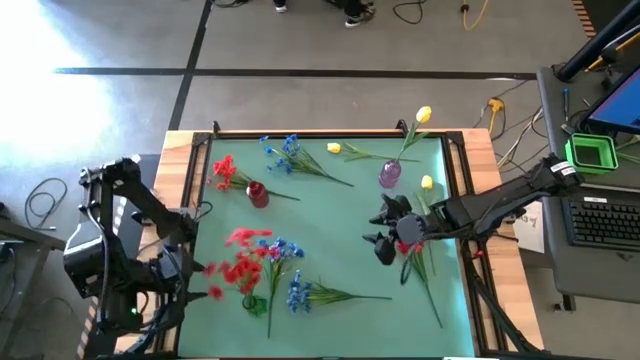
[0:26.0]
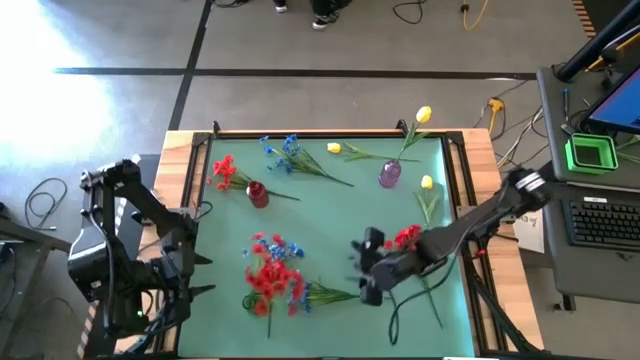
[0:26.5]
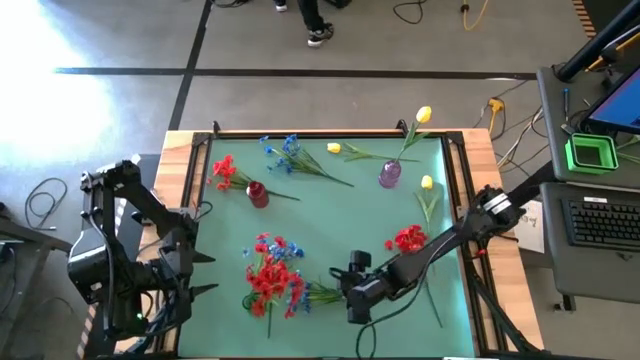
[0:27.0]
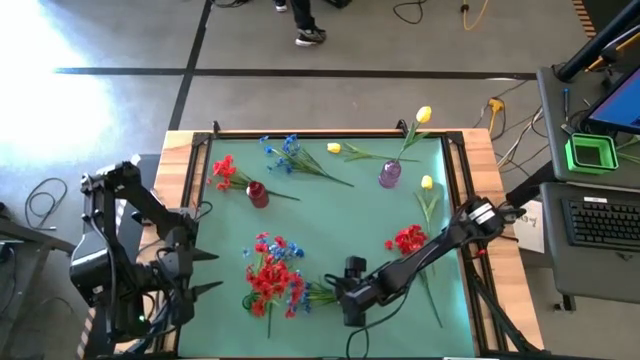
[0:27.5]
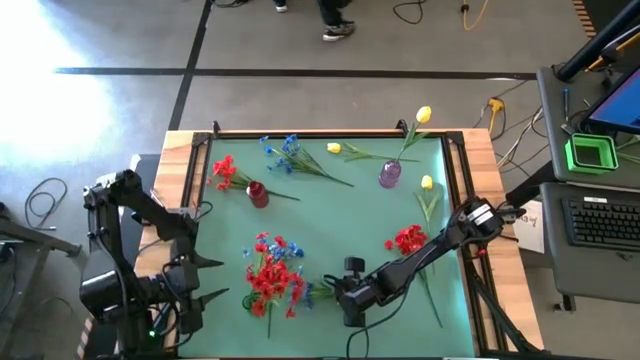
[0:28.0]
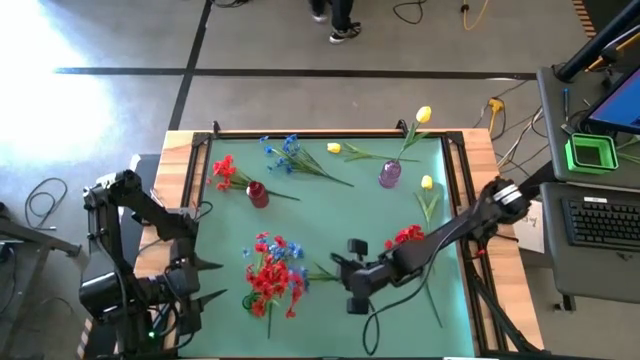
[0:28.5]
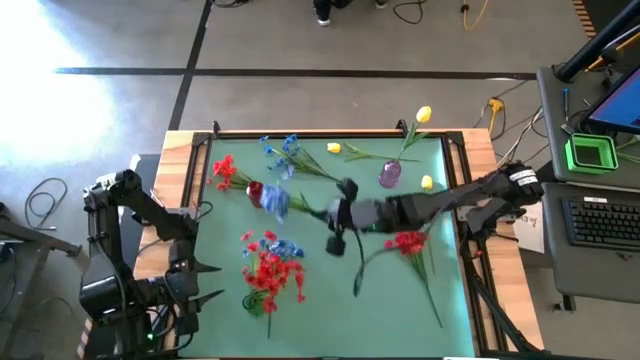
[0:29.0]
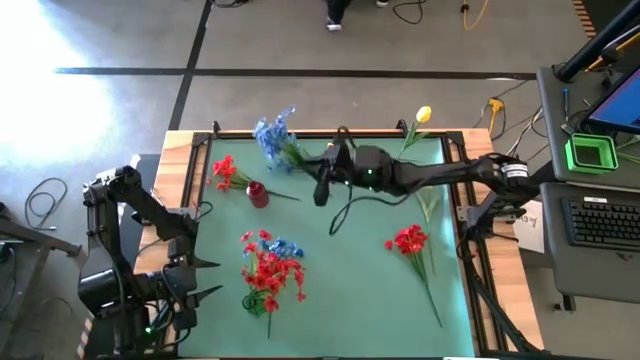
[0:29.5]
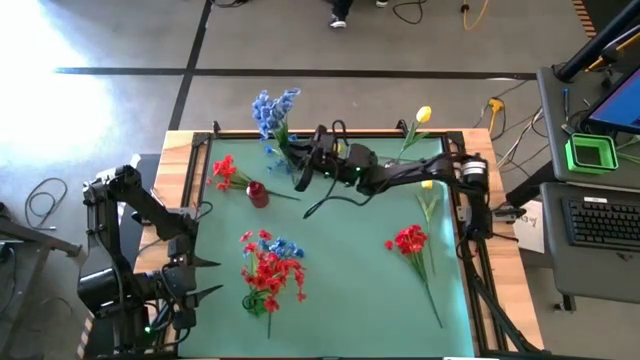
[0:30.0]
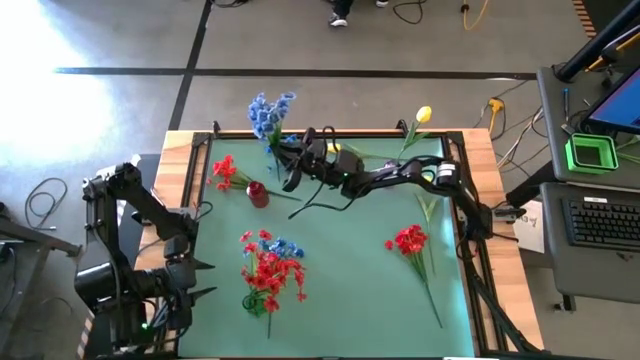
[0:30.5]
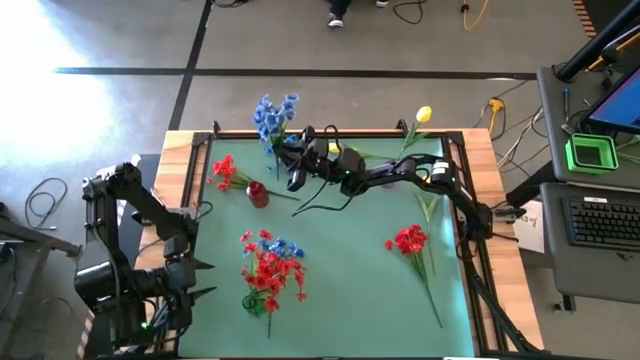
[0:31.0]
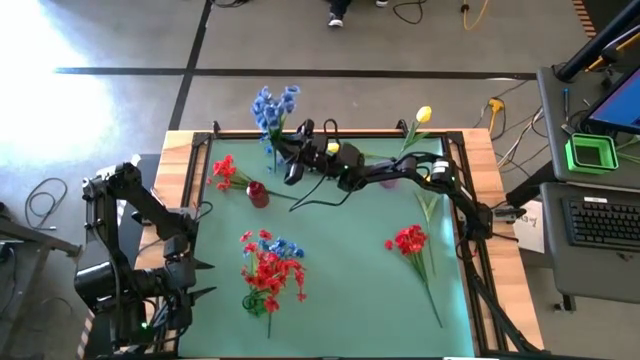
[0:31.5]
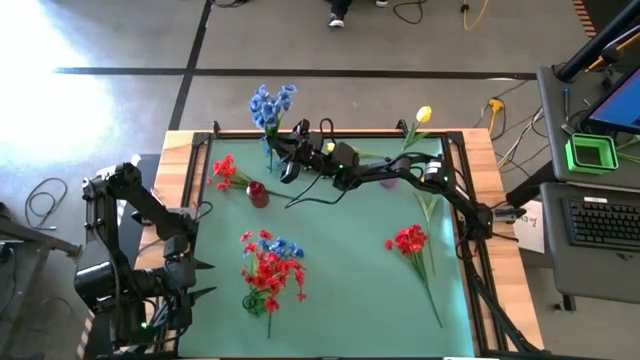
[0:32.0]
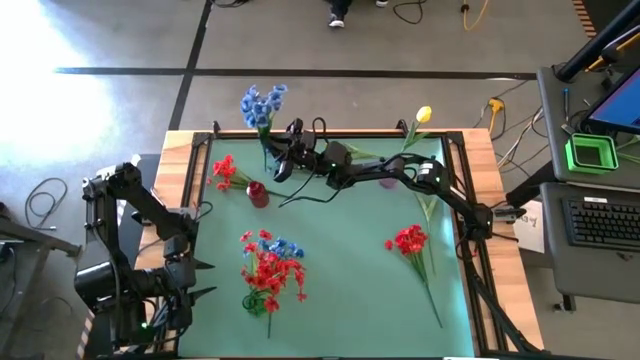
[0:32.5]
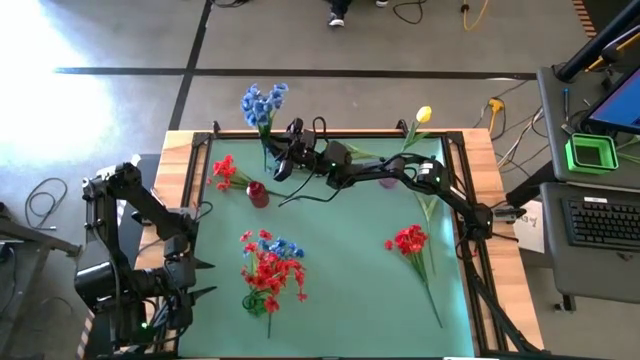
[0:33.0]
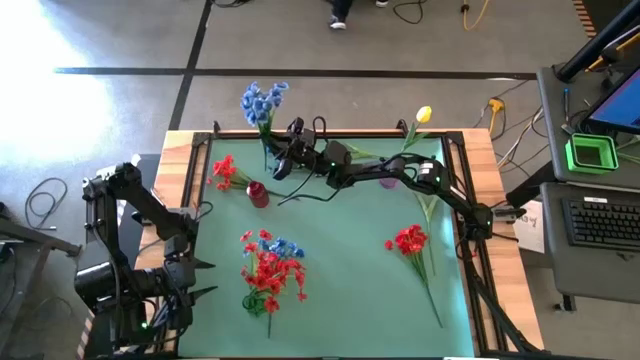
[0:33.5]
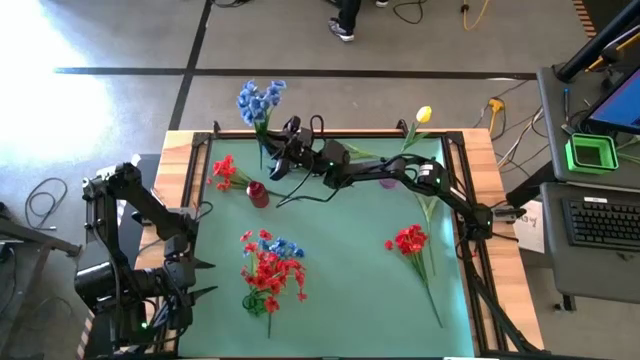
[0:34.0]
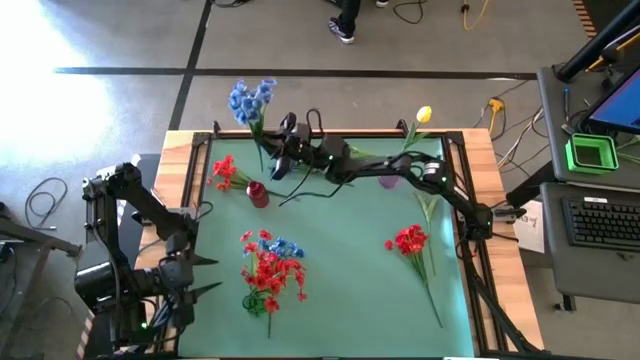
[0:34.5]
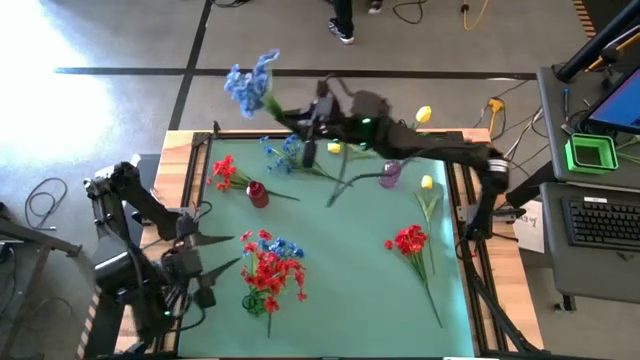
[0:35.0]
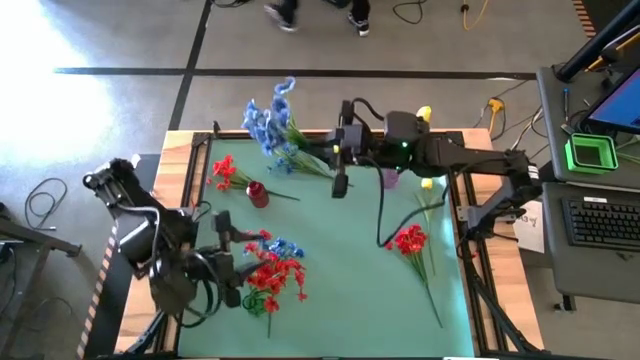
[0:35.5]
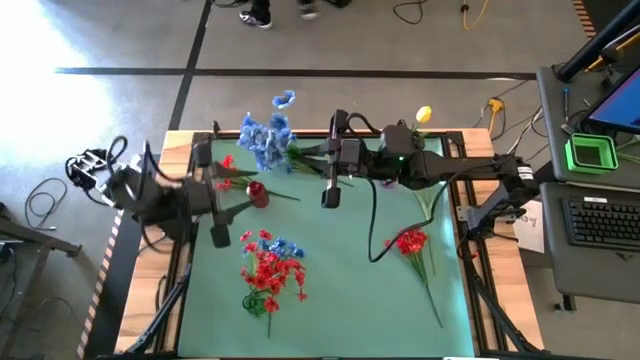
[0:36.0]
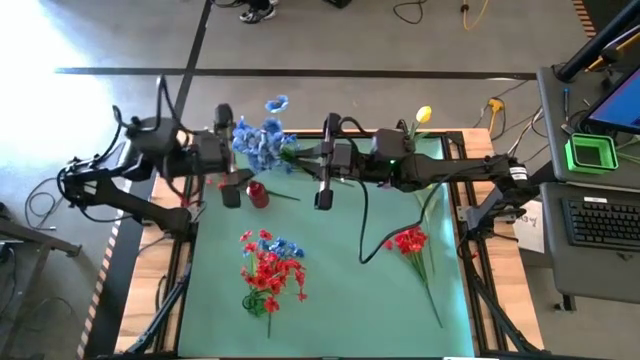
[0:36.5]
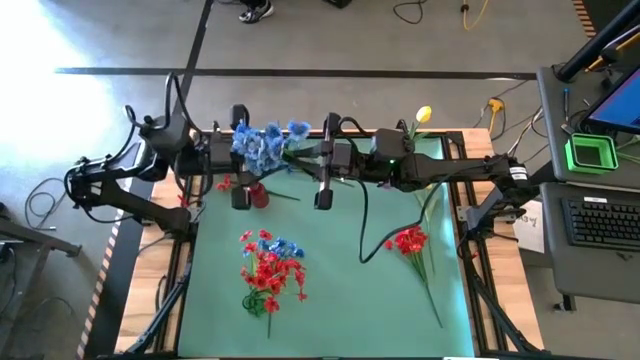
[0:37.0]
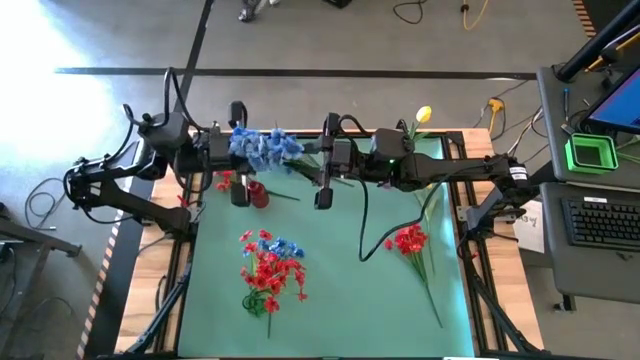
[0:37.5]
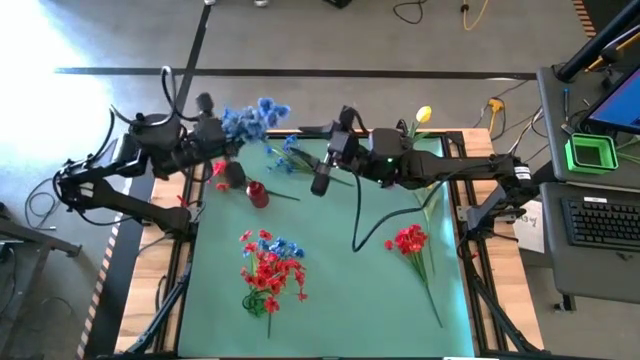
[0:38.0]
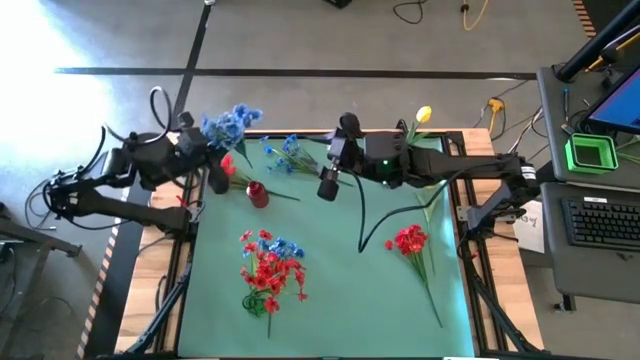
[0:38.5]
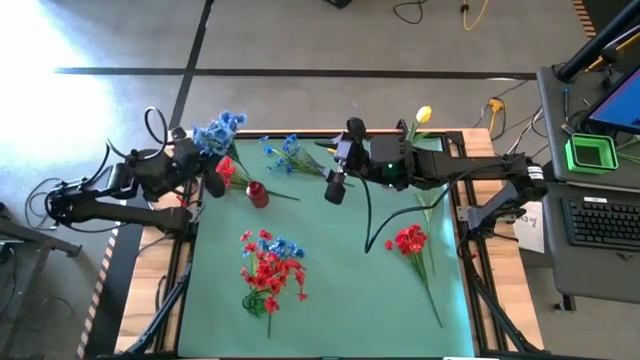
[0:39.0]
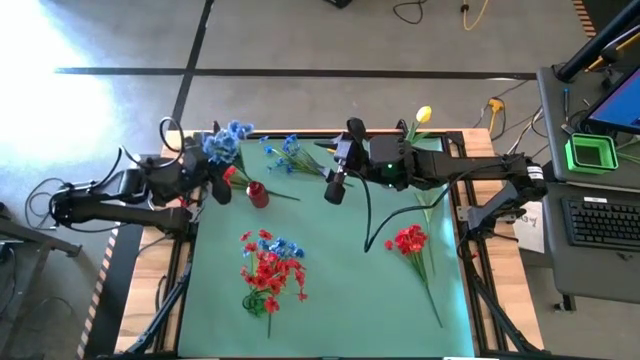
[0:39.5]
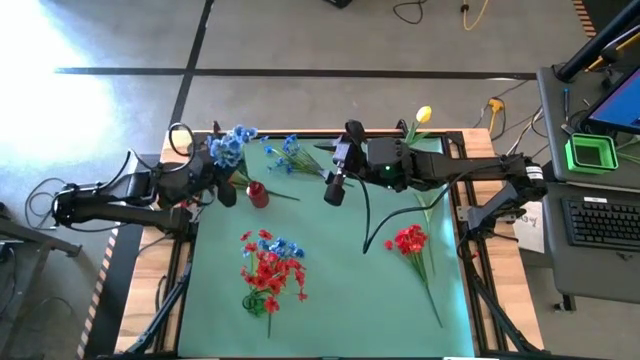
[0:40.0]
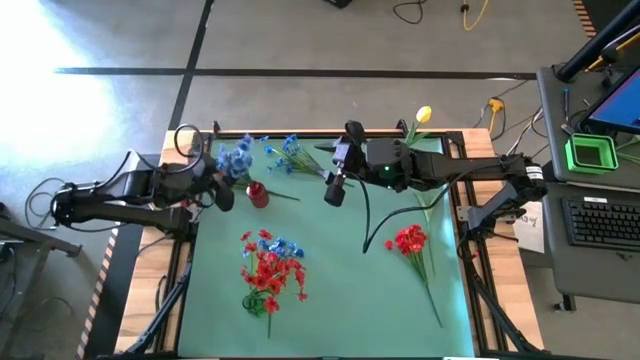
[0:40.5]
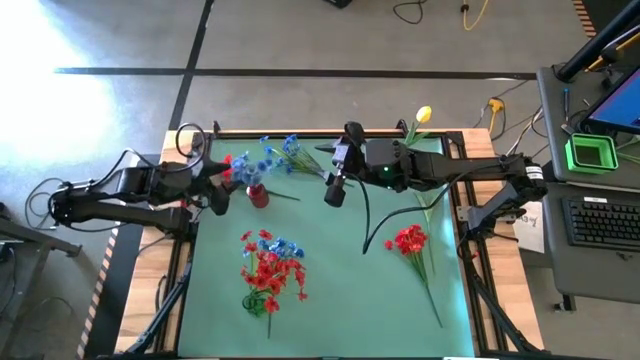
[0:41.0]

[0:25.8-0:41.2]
Task: Sort flowers into vase by color
Put the bottom right blue flower into the red vase

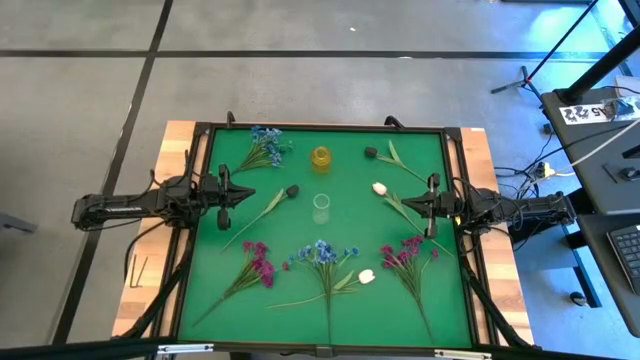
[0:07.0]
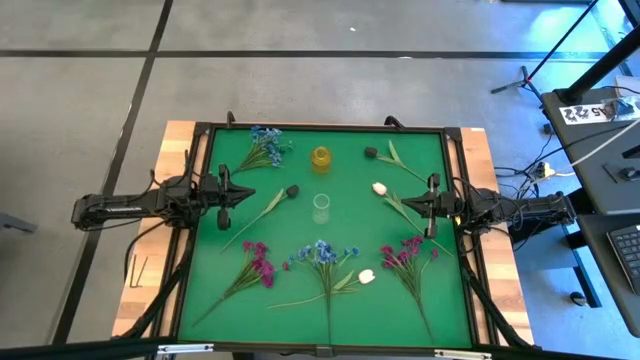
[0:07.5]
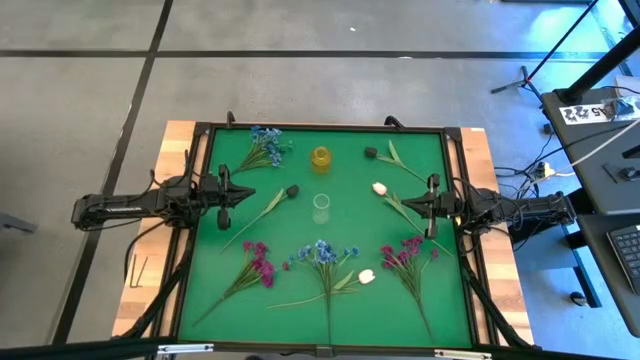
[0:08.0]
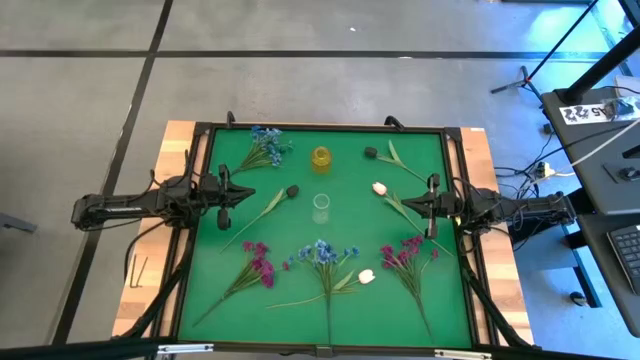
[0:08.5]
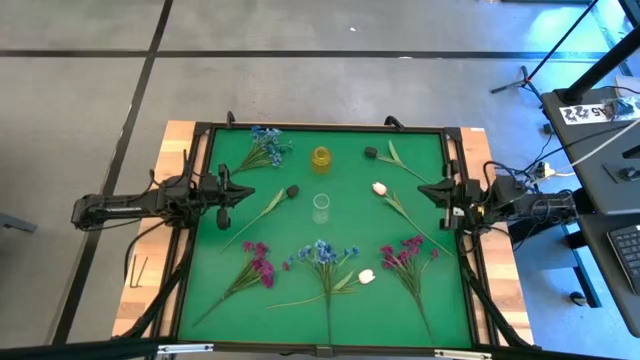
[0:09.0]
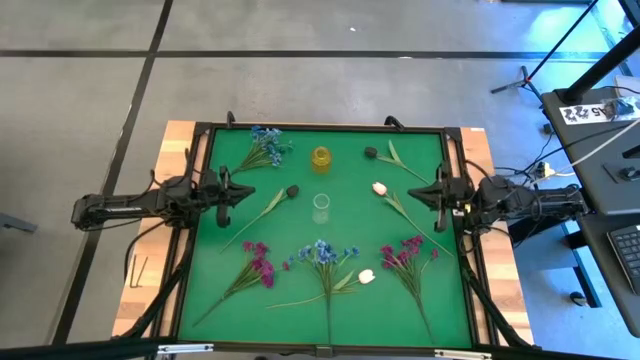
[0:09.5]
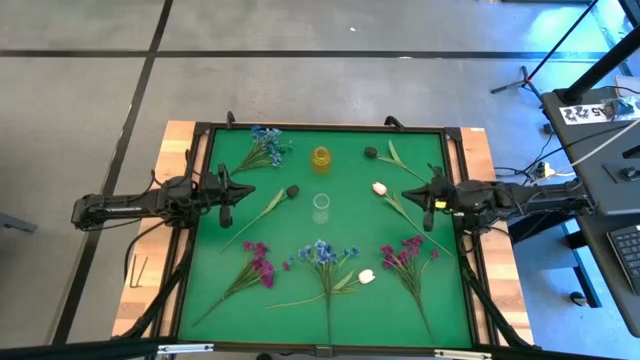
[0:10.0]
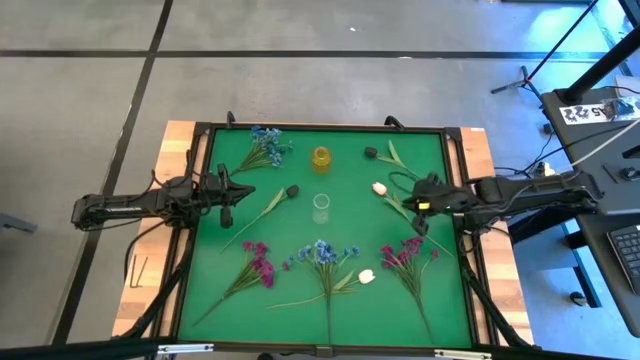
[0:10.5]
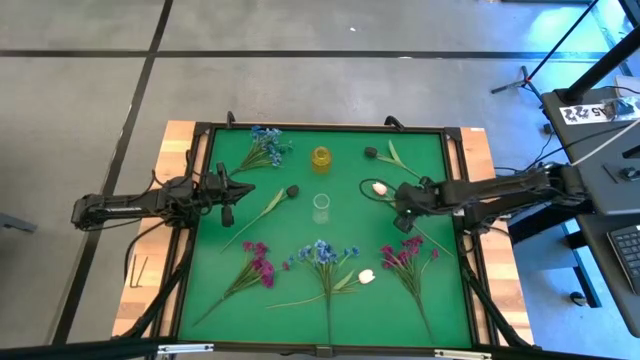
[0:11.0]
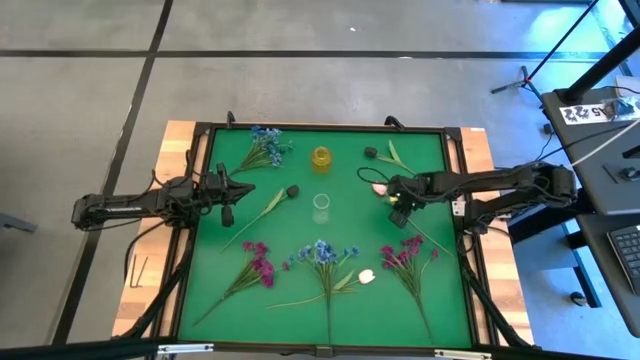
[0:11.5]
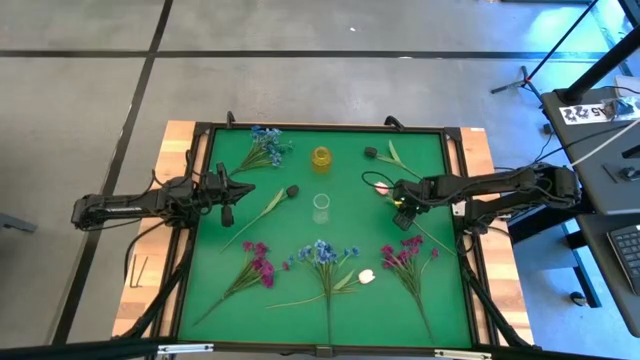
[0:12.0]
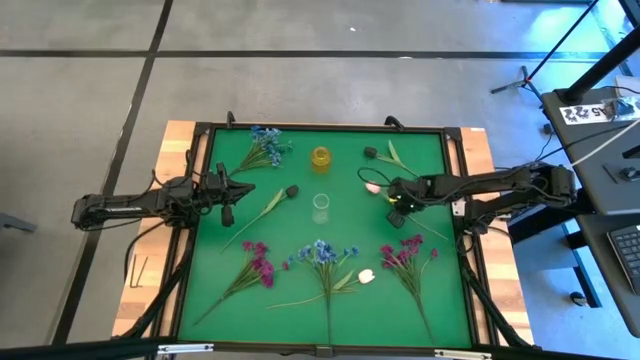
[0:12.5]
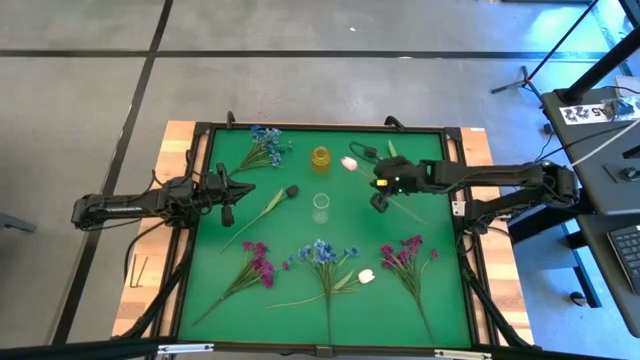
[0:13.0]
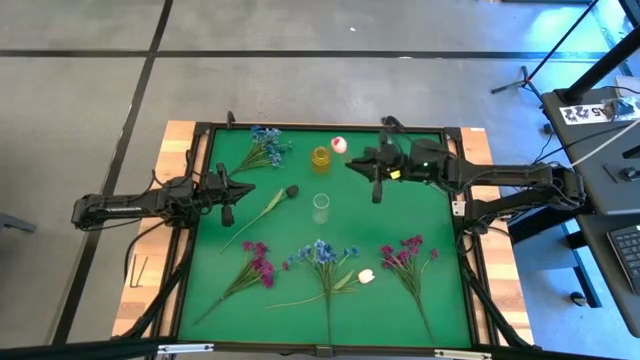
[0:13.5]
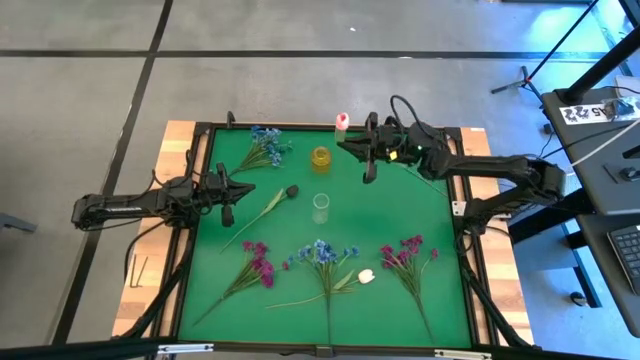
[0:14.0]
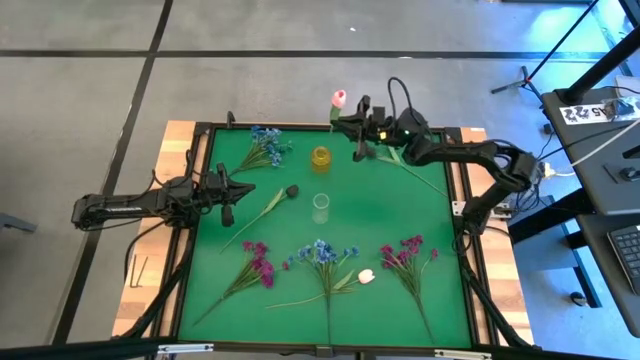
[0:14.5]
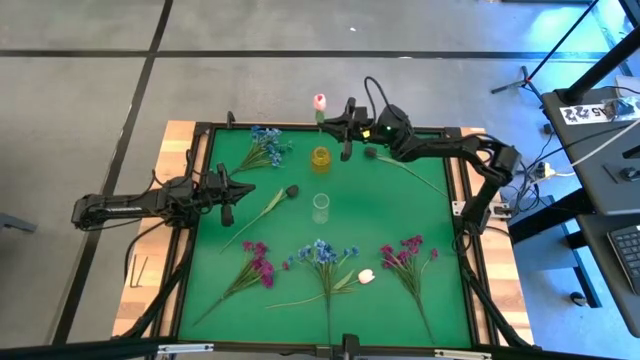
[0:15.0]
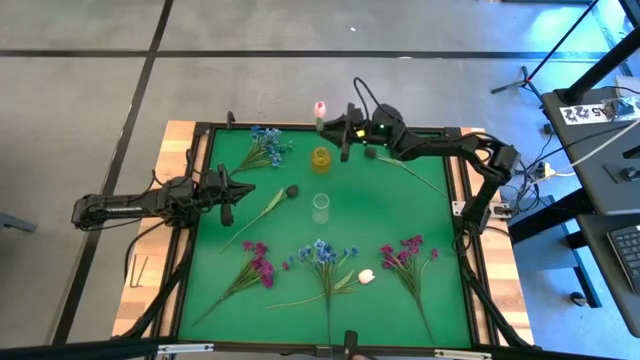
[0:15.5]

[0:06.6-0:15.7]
Task: Sort flowers into vase by color
Put the top pink tulip into the yellow vase
